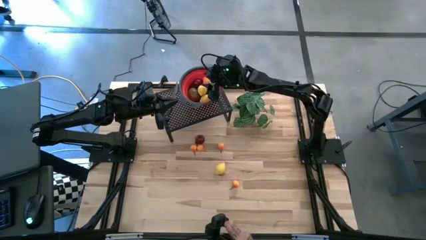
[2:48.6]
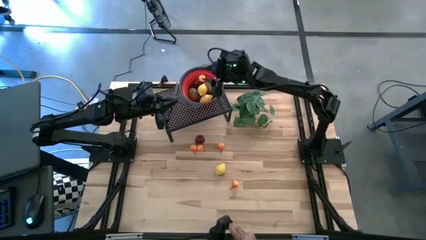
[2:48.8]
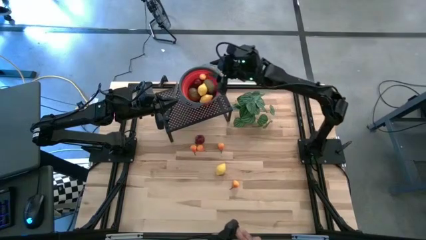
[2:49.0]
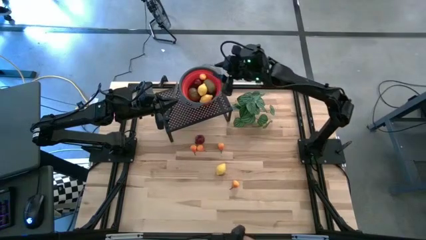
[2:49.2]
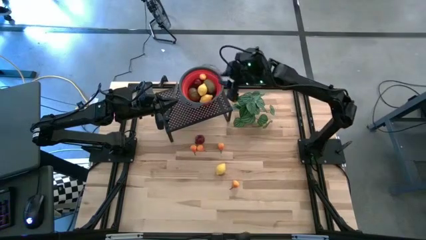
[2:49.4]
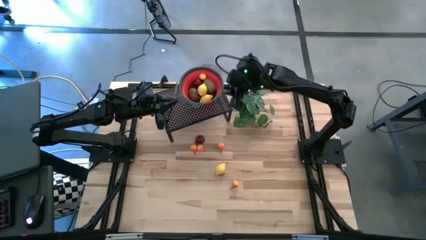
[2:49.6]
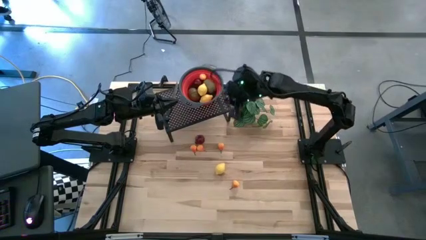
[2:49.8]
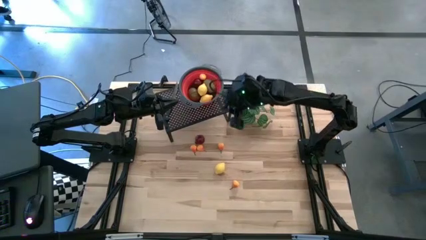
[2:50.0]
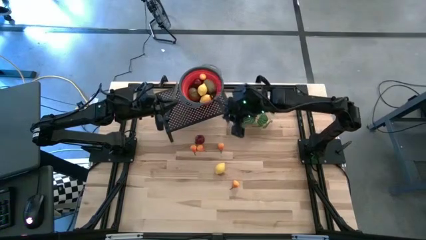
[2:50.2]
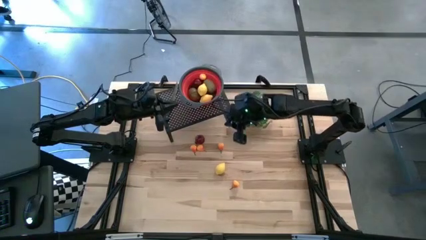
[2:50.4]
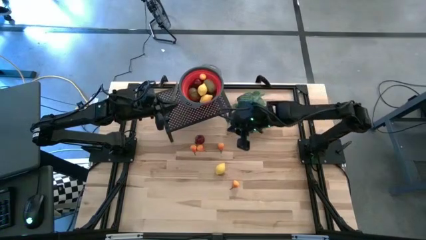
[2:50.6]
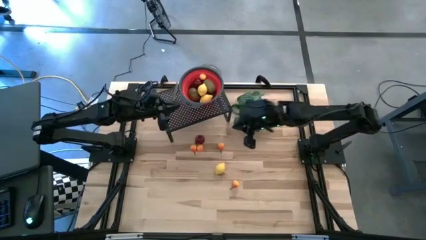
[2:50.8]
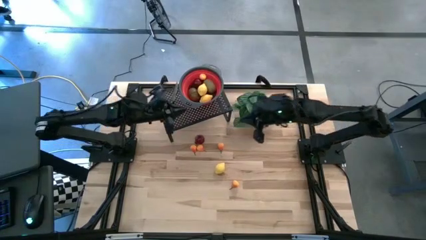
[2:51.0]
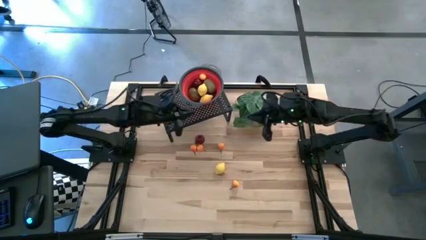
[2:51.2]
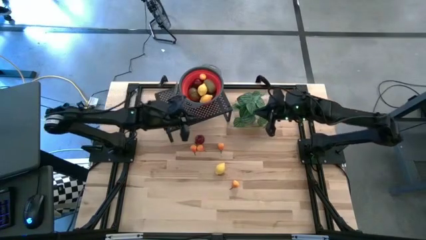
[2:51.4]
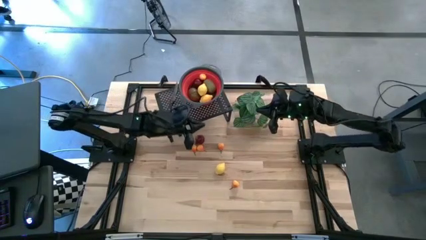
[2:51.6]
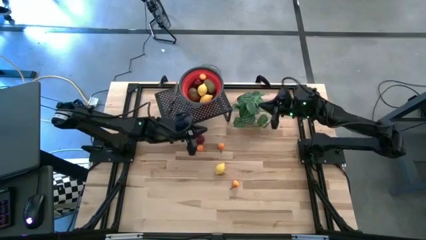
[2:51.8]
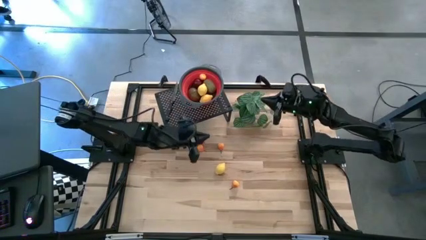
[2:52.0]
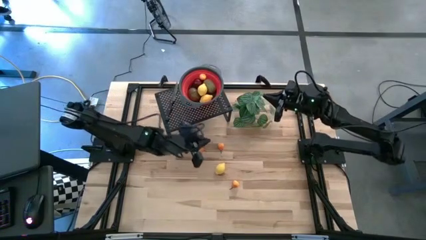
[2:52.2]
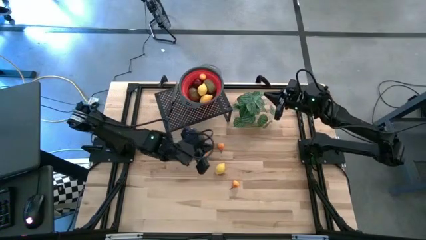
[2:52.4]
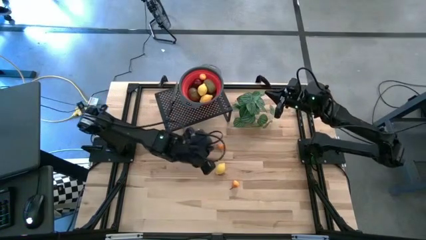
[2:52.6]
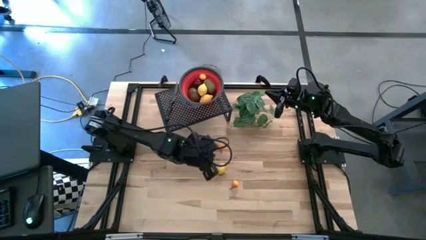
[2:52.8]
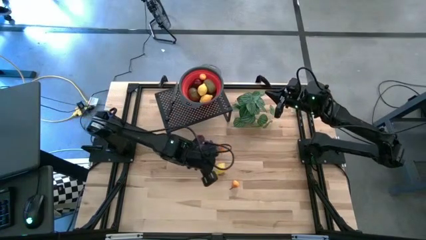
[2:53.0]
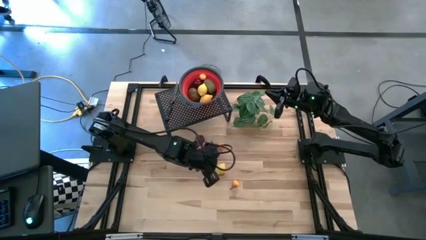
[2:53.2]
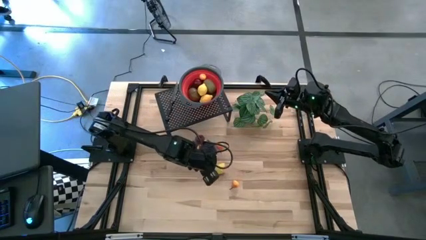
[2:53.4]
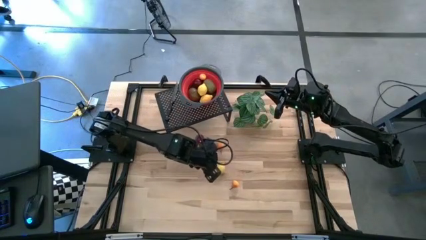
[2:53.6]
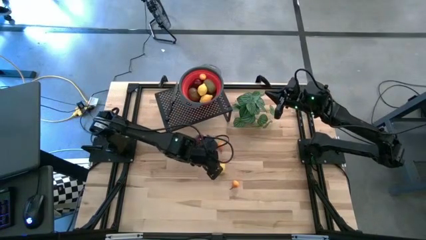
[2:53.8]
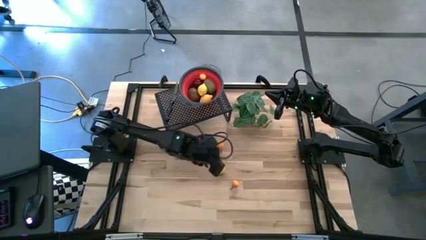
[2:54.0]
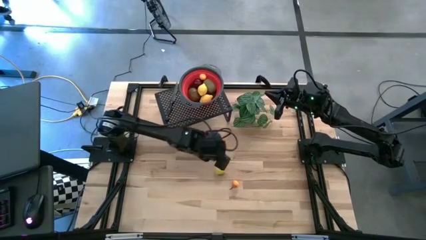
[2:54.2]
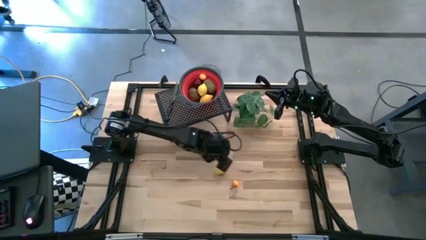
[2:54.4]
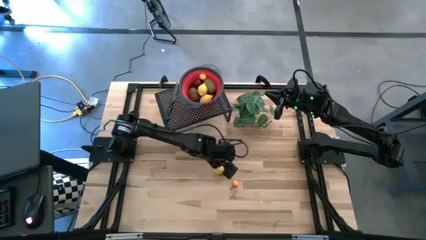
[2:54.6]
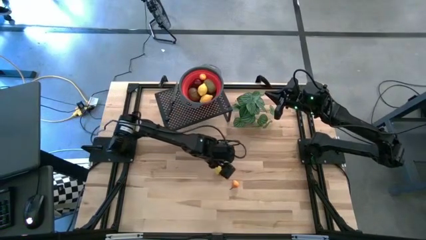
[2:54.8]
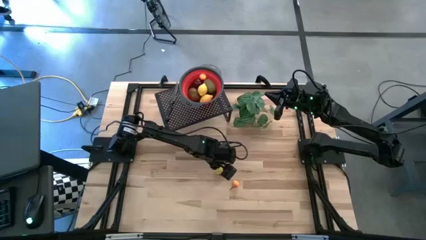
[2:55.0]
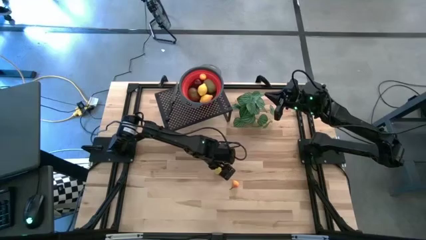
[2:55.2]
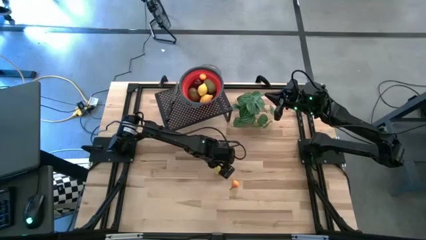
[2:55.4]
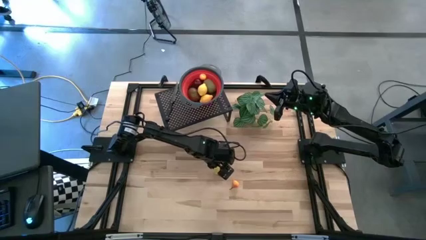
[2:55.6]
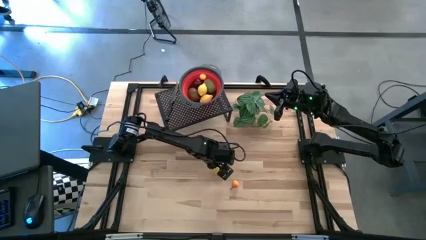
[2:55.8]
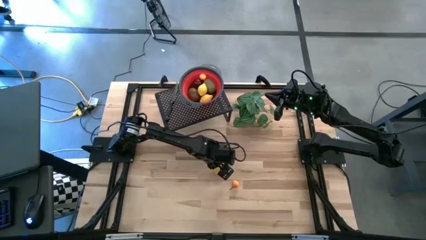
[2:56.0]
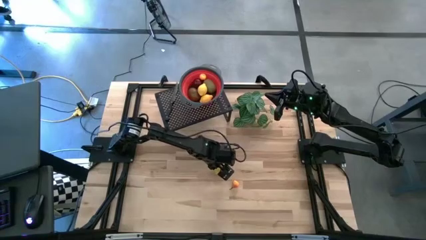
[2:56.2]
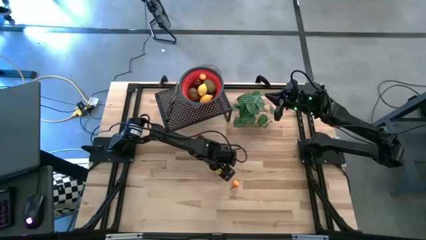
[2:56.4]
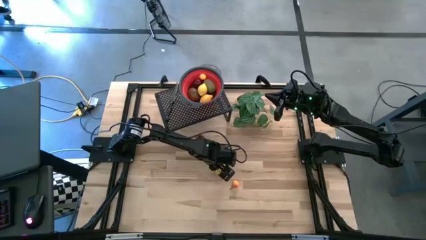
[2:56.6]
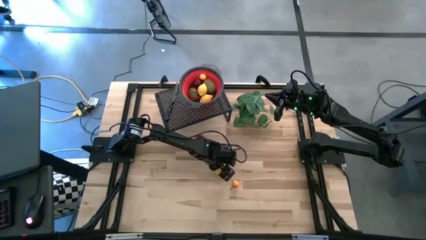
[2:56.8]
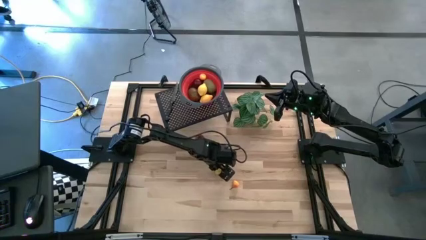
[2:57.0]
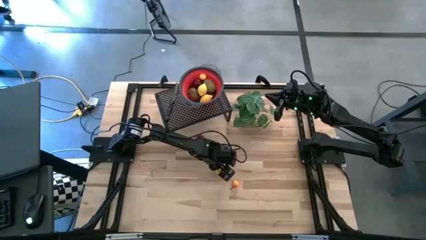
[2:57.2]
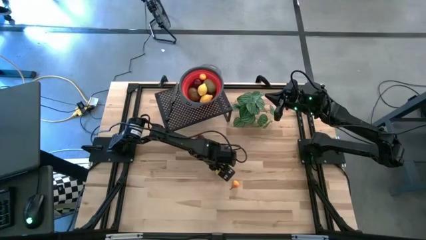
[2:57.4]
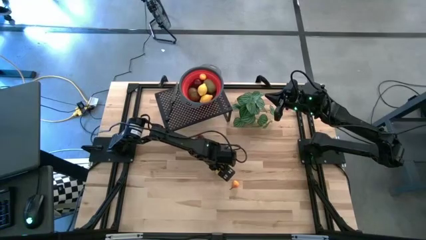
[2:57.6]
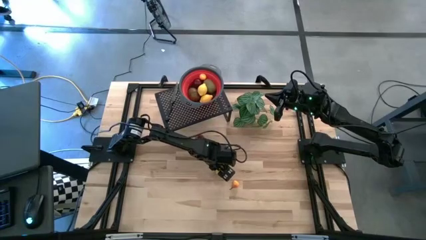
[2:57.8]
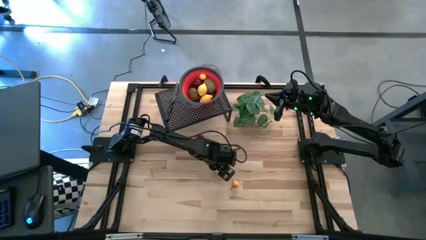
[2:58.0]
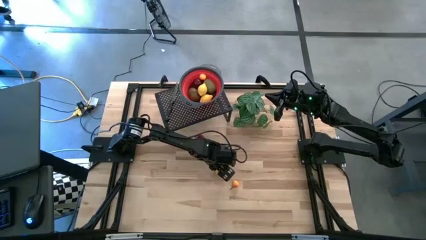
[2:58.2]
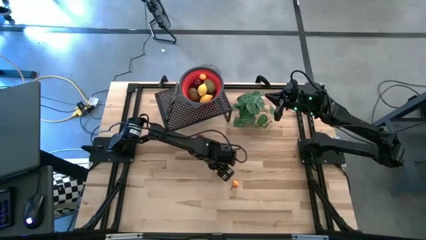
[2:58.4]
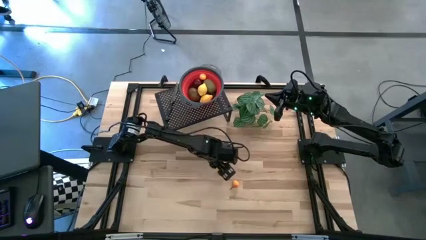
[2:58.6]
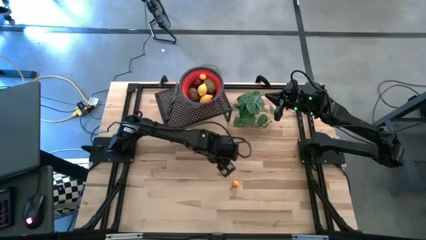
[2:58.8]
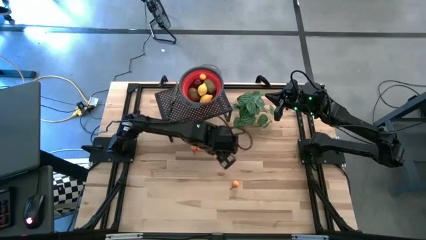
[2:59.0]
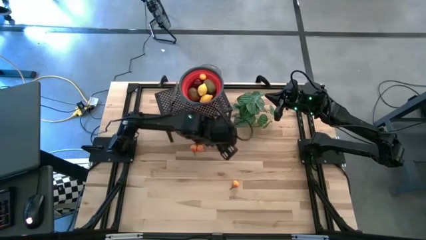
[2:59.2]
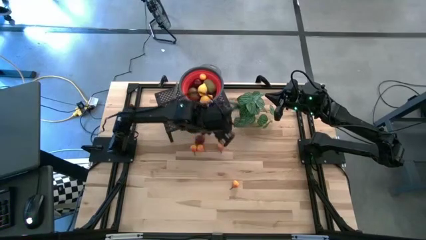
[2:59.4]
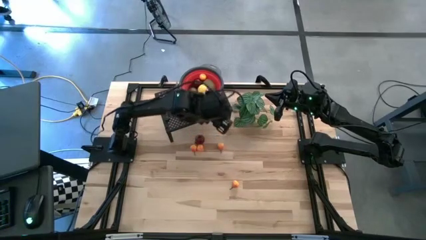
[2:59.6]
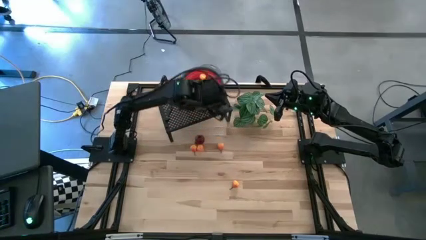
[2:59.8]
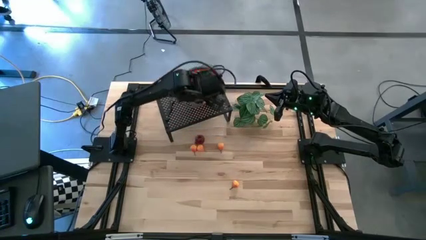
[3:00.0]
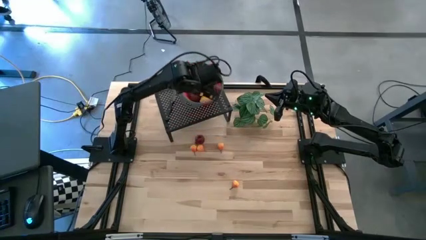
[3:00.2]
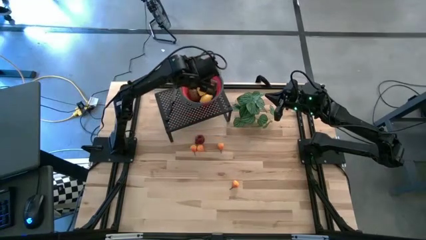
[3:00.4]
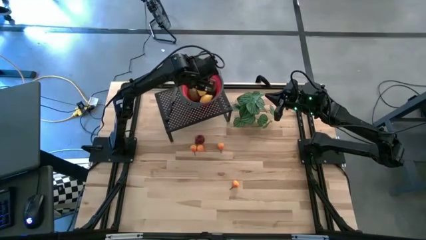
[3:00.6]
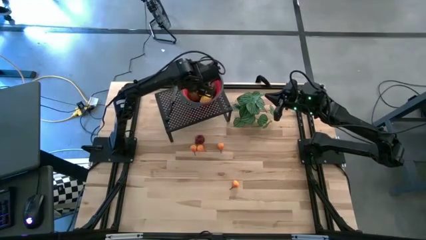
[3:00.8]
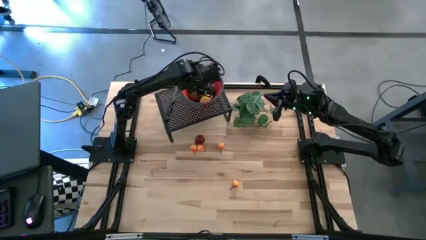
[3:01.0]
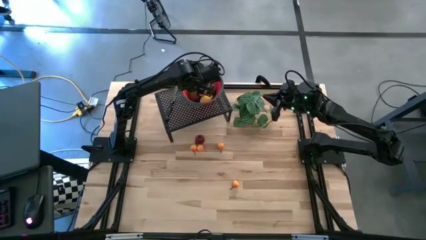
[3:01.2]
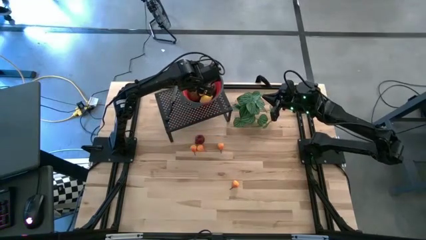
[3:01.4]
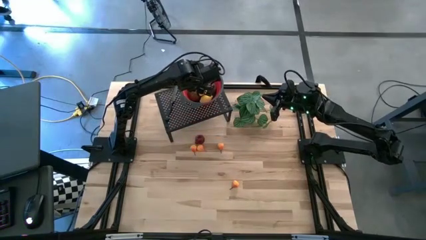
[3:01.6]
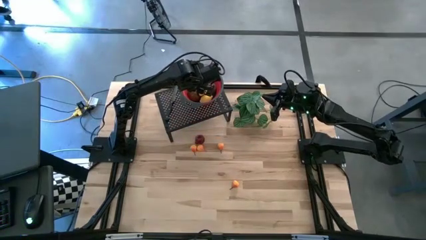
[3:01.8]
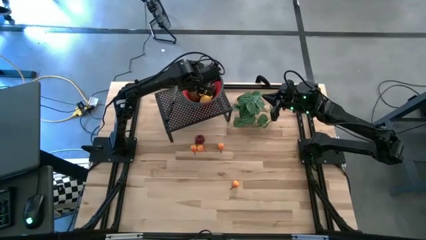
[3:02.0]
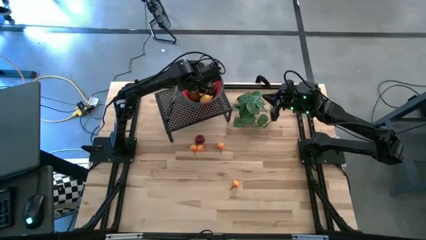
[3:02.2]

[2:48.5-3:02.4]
Task: Pick & Place Fruit
Put the yellow lemon into the red basket on the shelf
